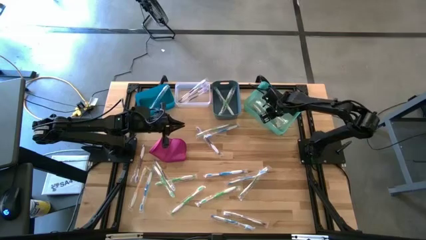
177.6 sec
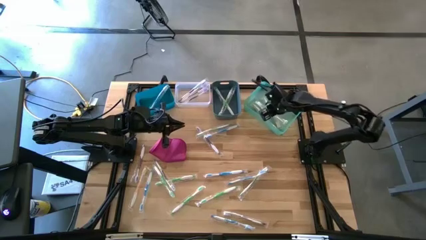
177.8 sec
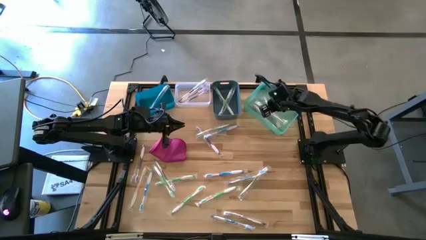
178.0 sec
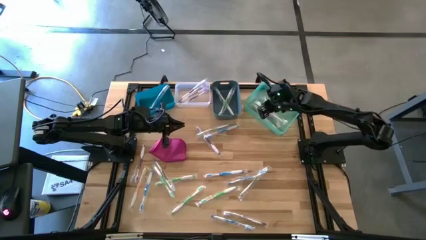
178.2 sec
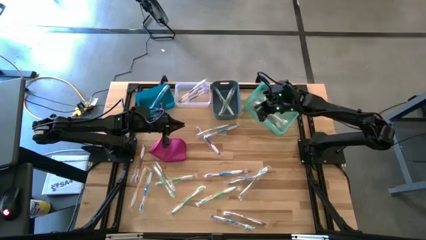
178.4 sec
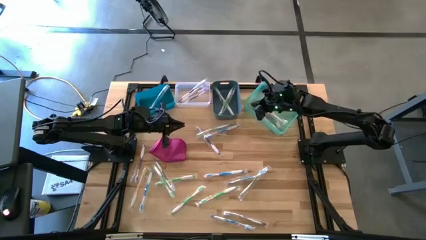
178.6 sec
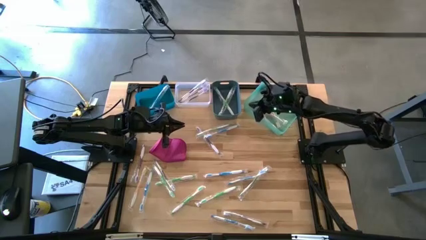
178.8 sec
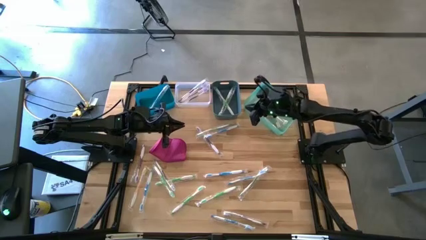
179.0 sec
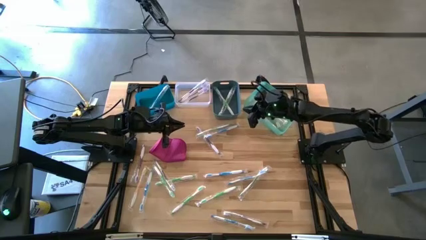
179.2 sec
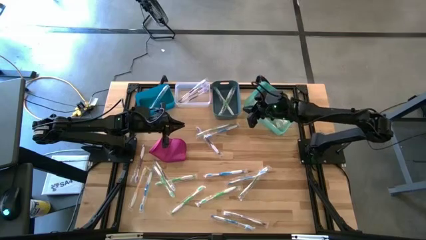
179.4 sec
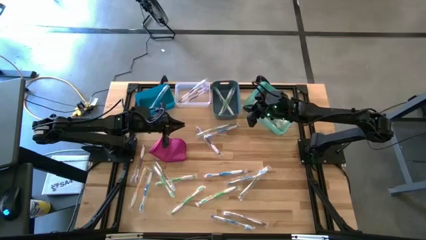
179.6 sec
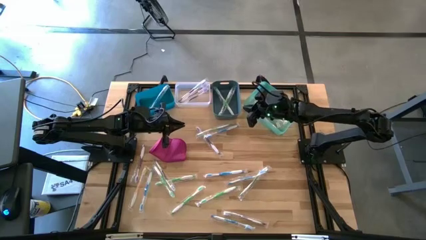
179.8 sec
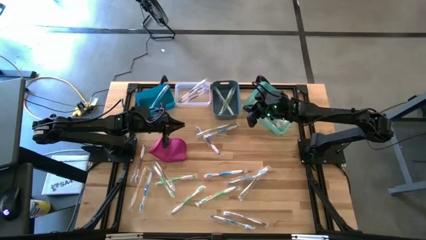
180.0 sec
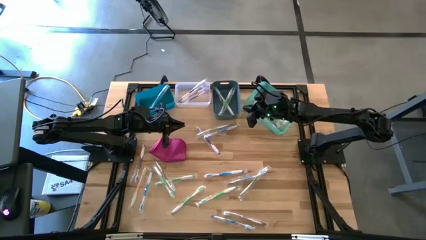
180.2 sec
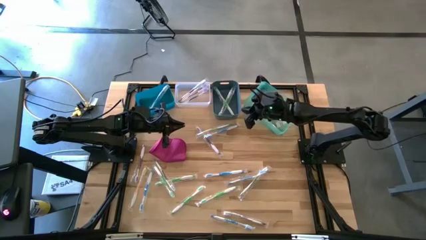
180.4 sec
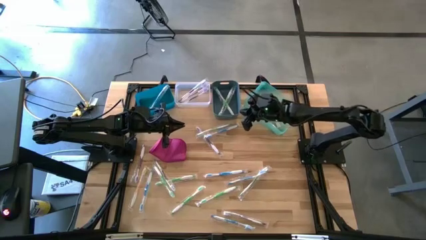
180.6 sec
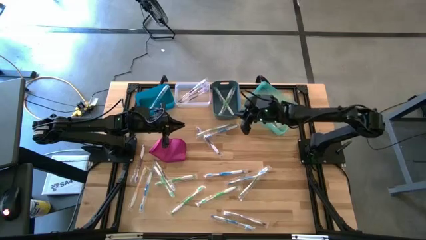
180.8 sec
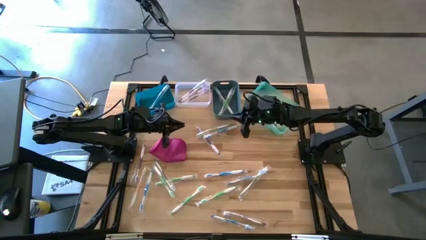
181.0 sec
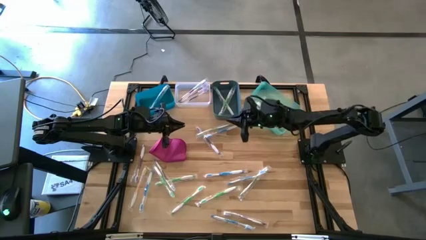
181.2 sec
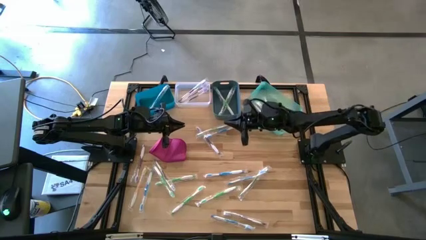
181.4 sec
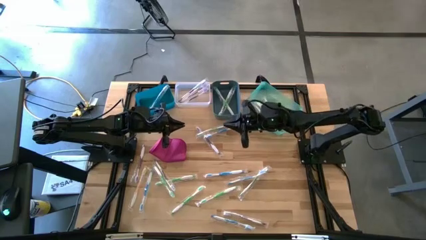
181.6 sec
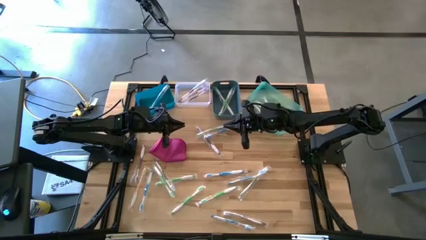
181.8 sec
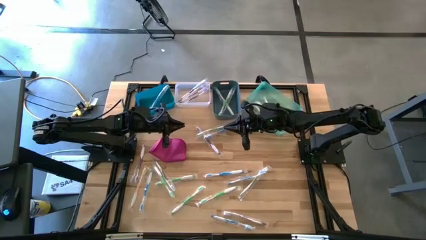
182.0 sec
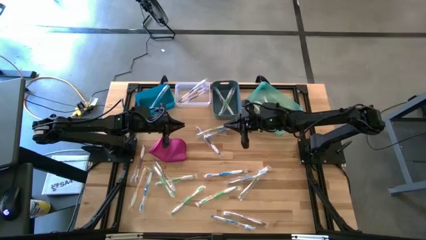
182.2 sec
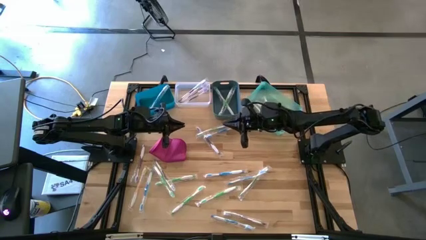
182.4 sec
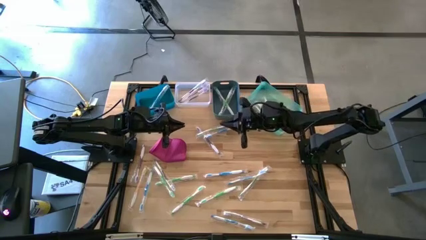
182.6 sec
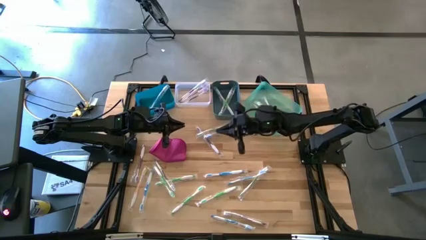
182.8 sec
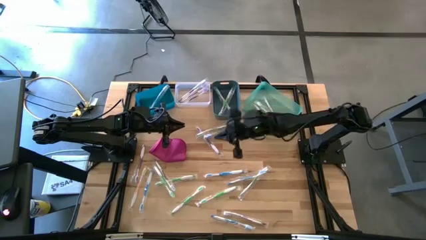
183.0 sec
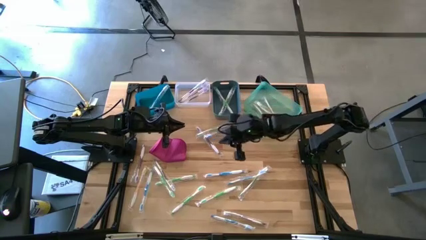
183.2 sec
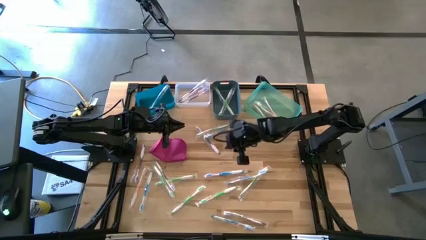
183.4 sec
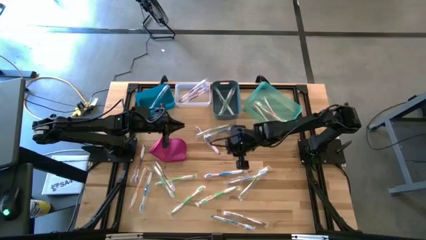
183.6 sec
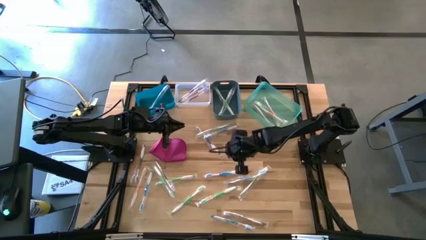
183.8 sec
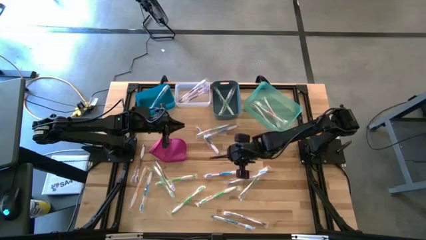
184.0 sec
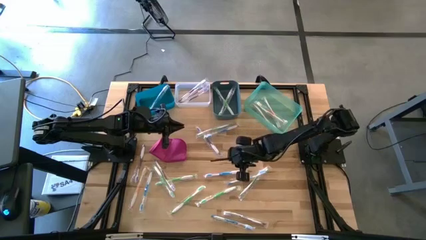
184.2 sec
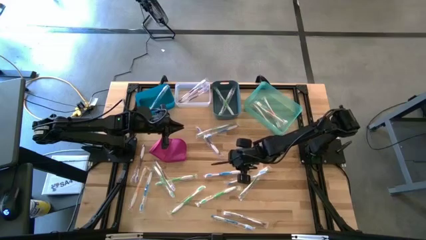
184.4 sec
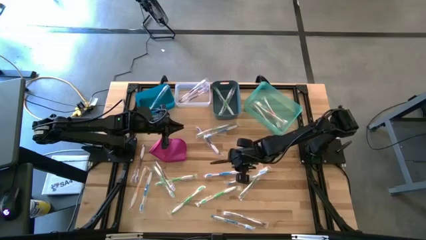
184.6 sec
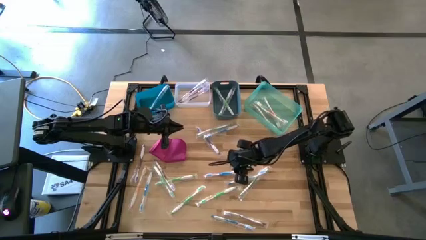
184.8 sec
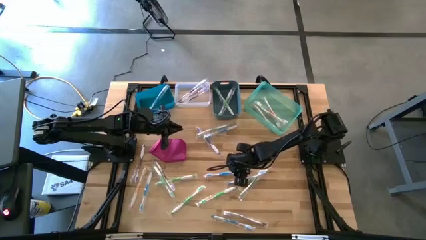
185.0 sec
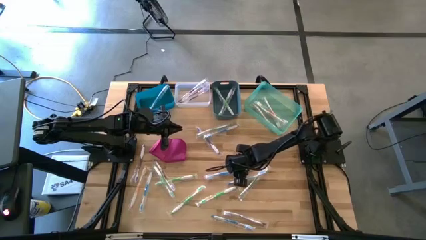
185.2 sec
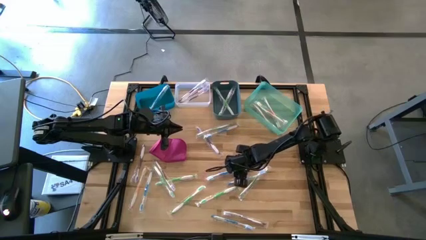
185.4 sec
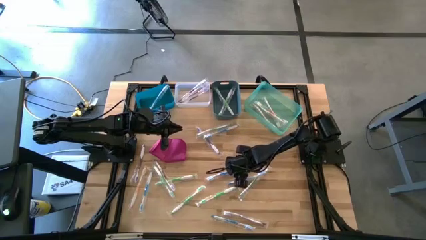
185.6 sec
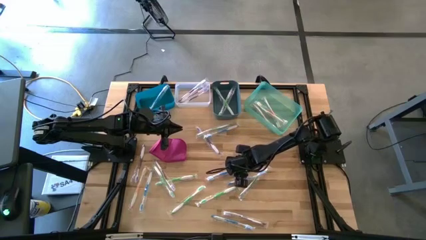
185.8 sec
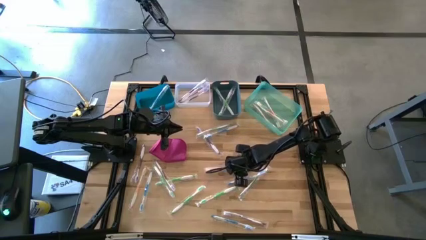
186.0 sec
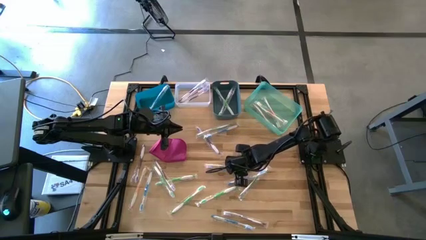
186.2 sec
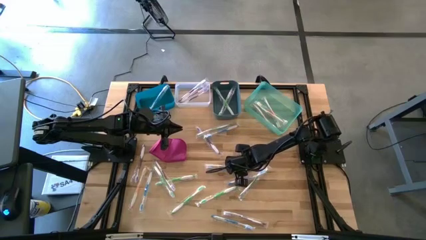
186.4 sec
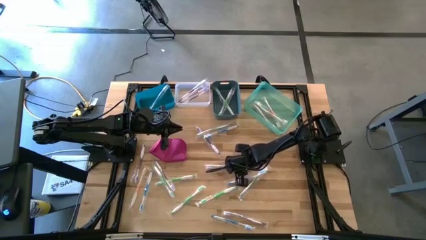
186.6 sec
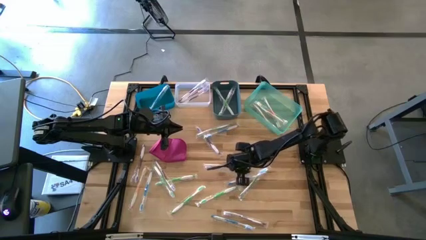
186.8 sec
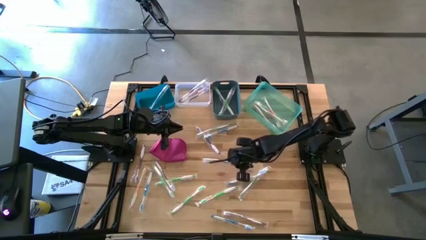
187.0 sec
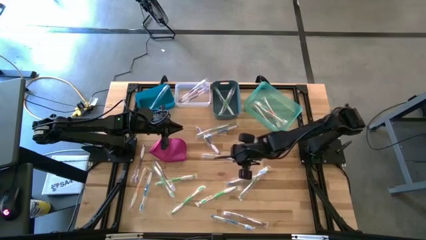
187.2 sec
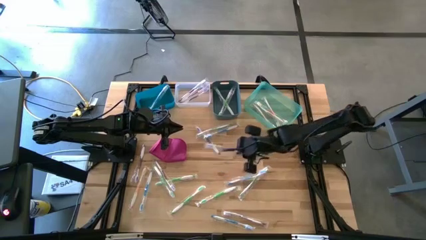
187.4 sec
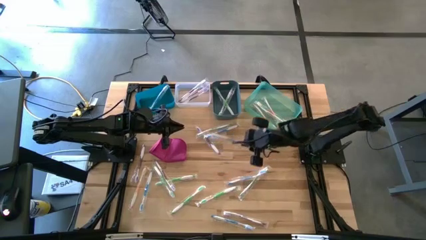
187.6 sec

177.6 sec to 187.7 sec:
Task: Pick & Place Toothbrushes
Put the blue toothbrush into the blue bin

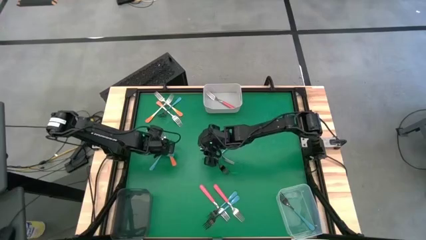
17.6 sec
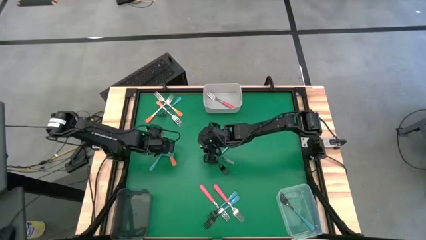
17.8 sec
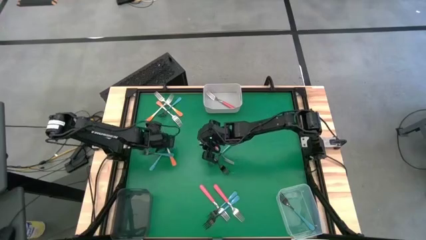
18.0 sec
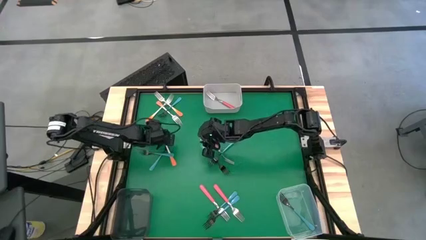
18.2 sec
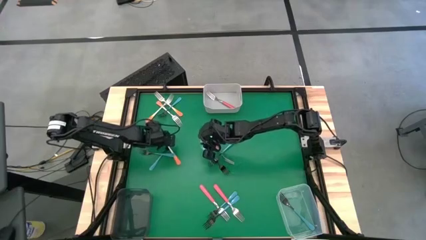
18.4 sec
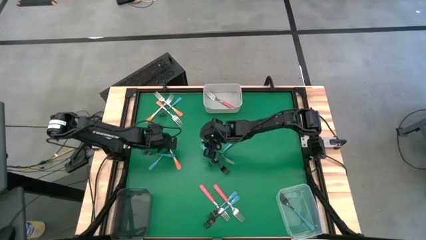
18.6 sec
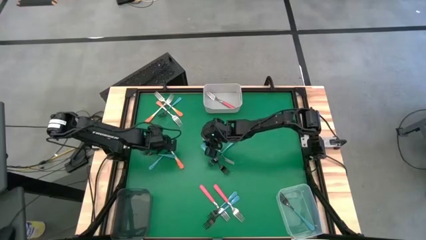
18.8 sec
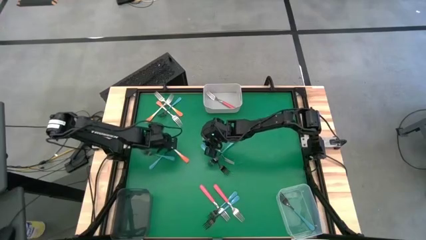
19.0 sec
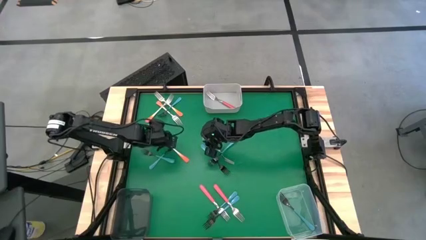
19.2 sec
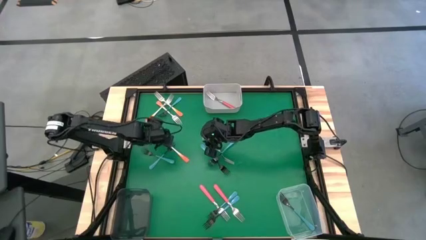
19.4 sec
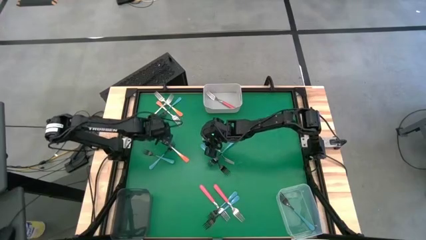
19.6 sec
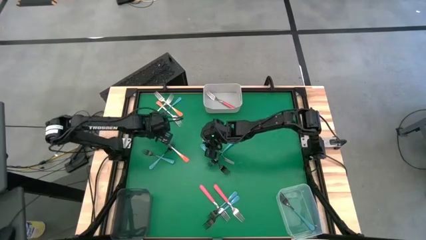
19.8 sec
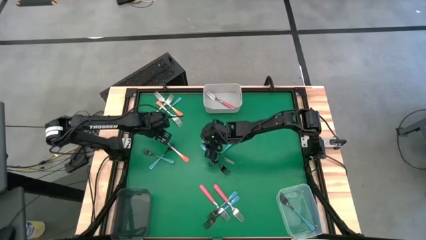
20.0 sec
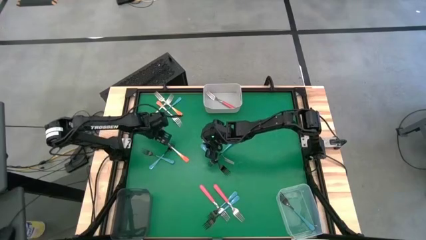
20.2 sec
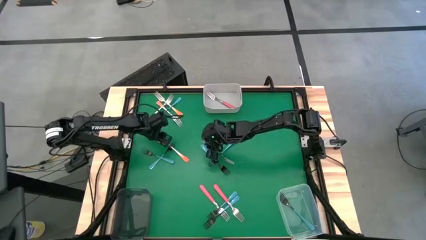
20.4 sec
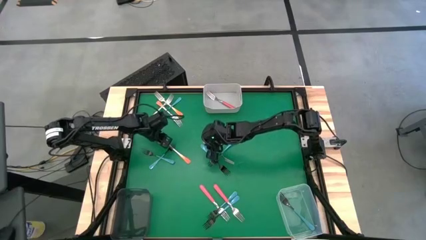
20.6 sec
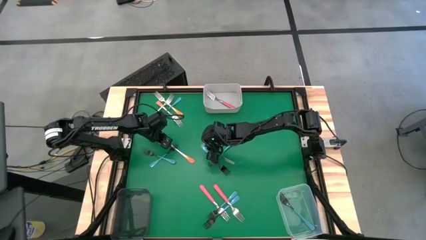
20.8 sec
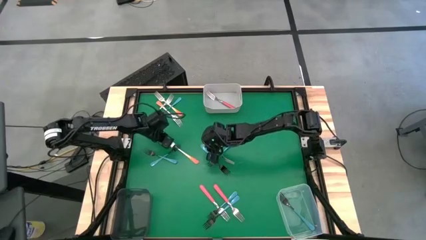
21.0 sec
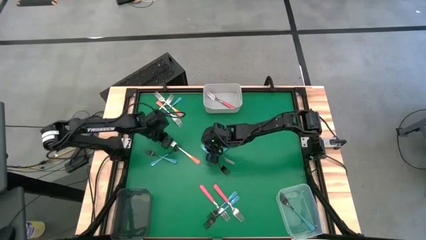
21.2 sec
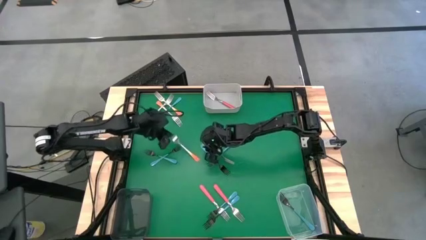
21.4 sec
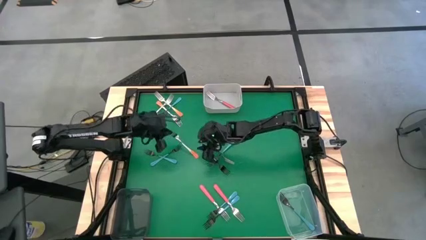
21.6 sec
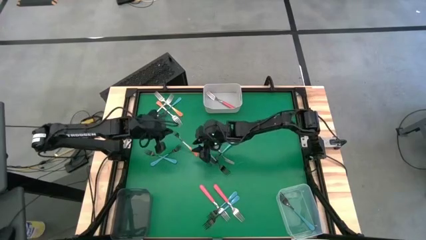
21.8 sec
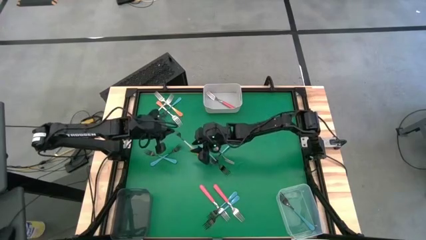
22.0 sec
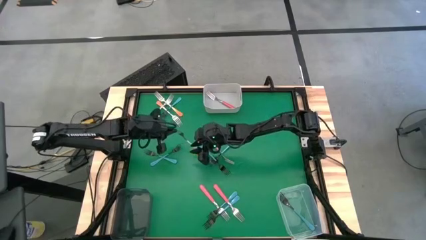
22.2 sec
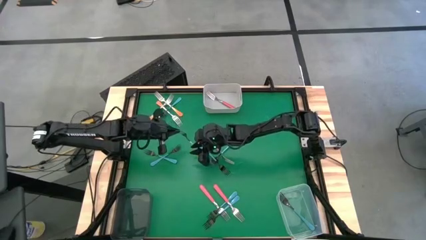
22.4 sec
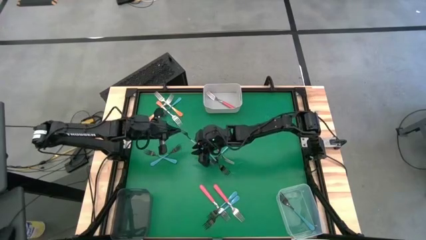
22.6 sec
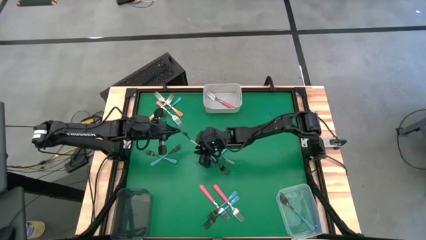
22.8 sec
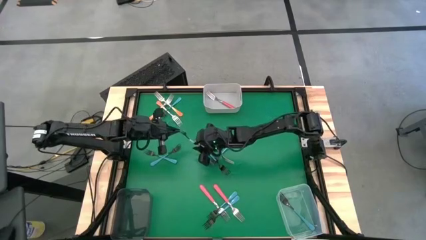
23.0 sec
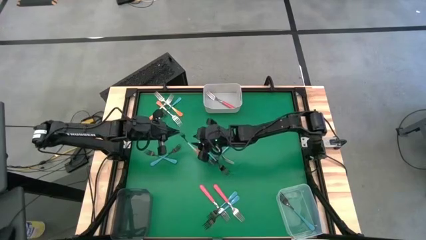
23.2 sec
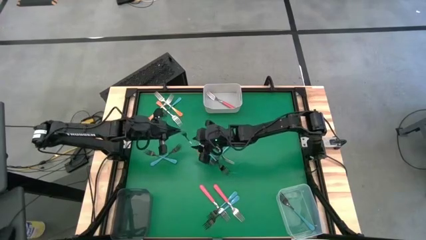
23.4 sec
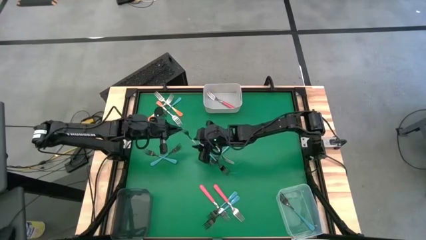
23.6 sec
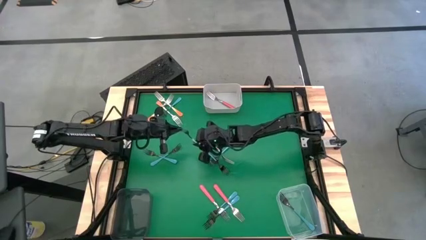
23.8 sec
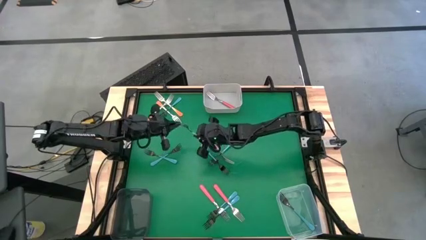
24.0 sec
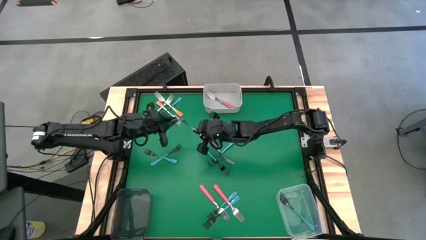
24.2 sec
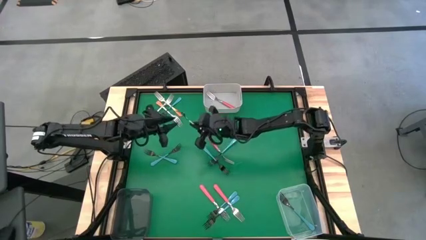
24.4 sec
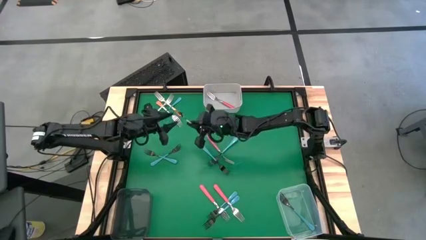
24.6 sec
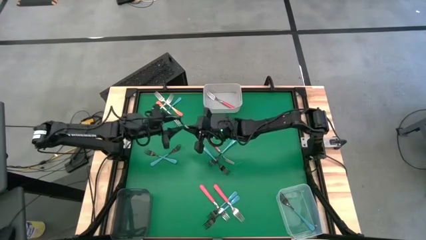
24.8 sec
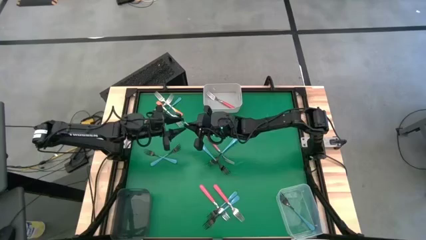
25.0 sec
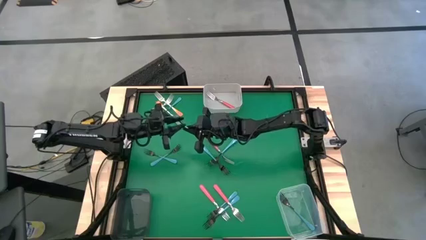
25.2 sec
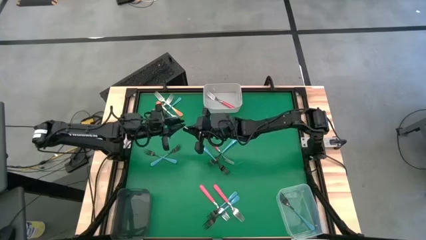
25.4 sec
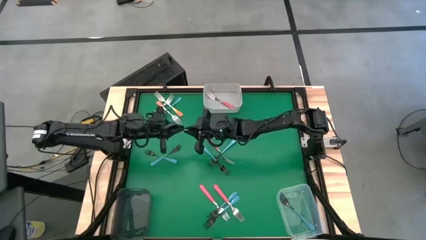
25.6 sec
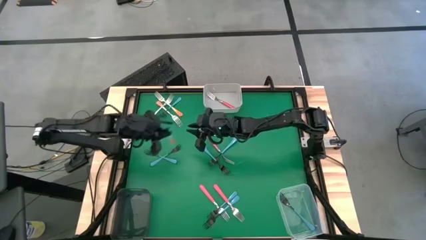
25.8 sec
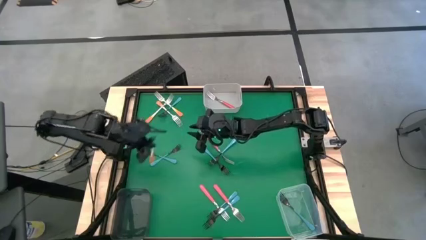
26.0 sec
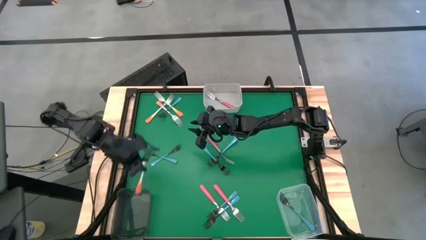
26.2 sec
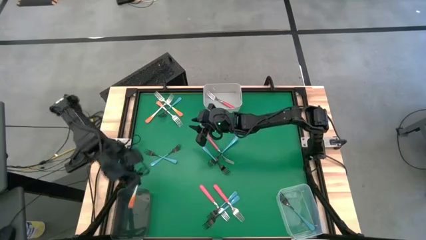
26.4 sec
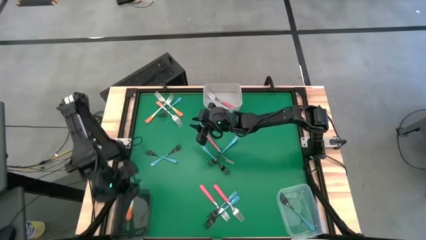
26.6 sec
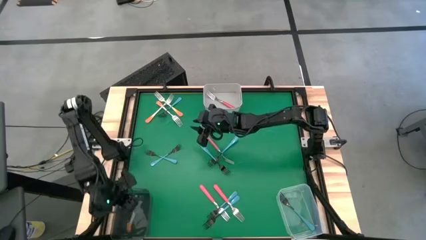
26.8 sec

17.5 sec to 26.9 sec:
Task: Sort silverware by color (type)
Put the orange fork into the black bin
